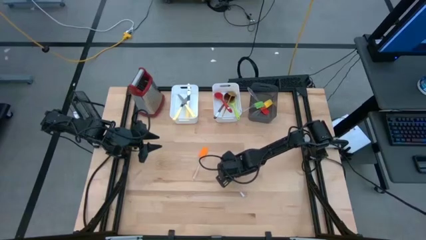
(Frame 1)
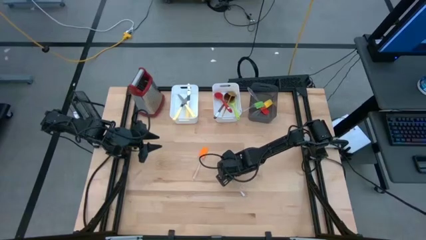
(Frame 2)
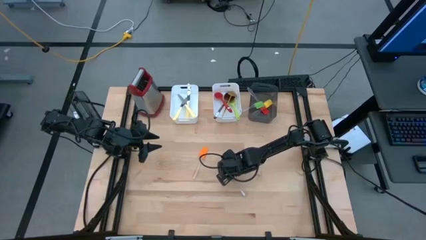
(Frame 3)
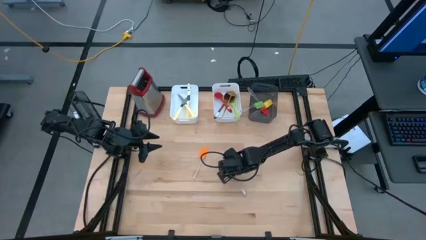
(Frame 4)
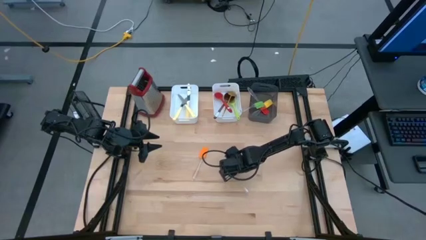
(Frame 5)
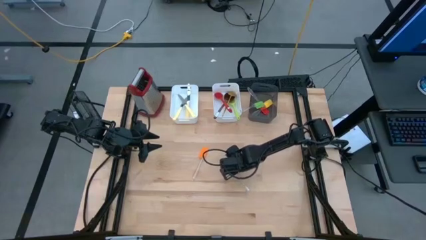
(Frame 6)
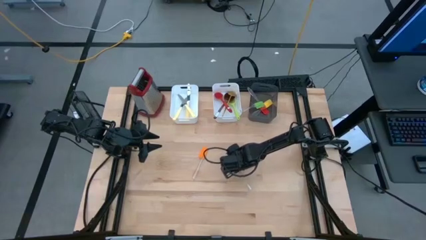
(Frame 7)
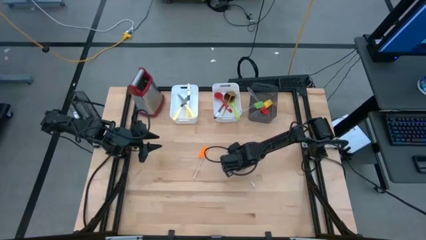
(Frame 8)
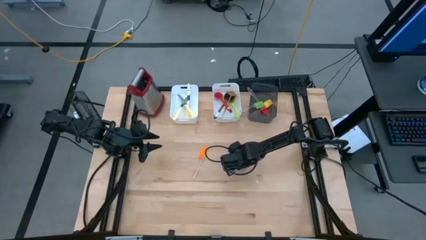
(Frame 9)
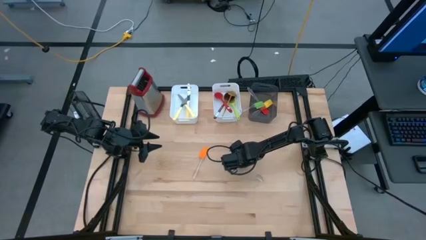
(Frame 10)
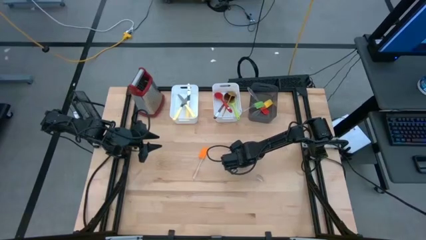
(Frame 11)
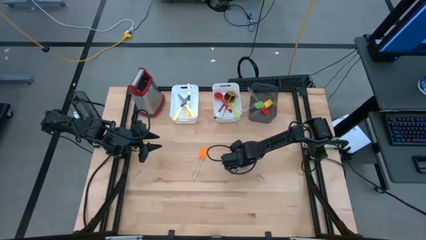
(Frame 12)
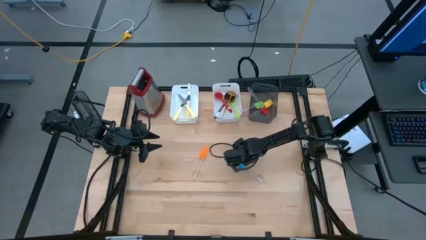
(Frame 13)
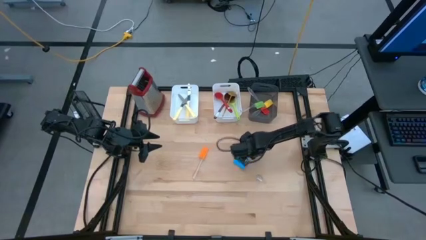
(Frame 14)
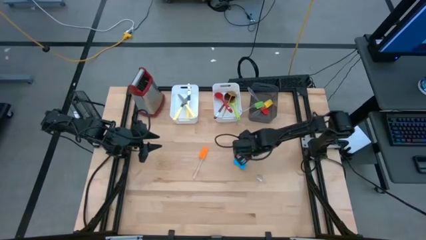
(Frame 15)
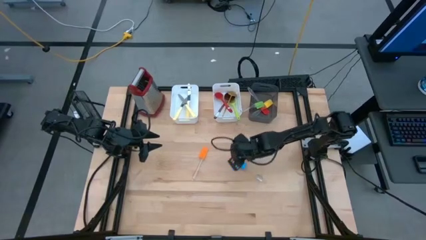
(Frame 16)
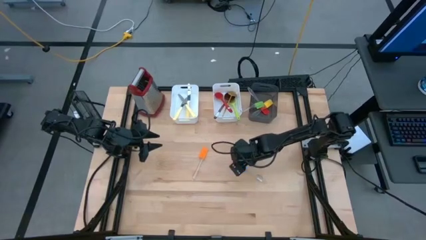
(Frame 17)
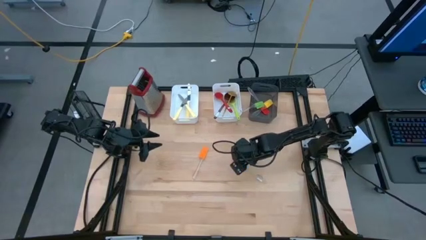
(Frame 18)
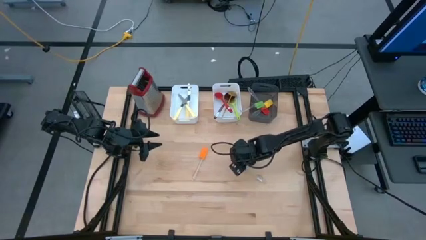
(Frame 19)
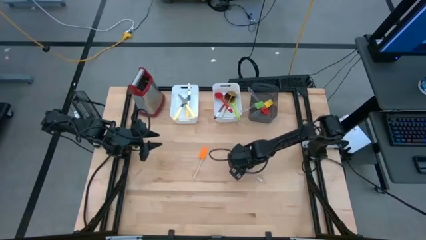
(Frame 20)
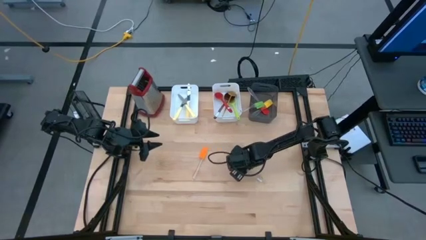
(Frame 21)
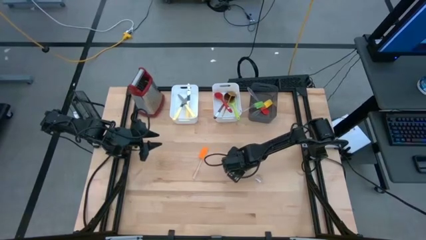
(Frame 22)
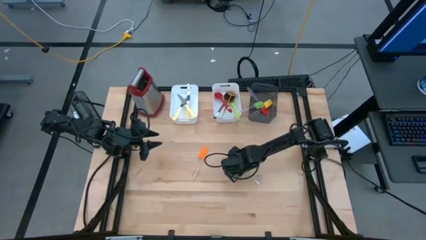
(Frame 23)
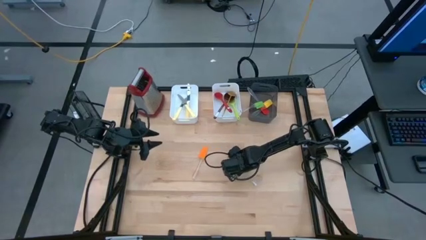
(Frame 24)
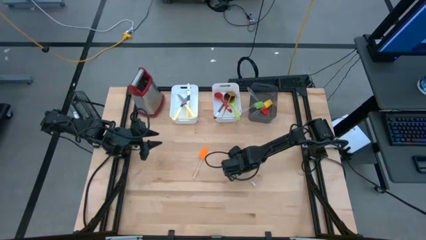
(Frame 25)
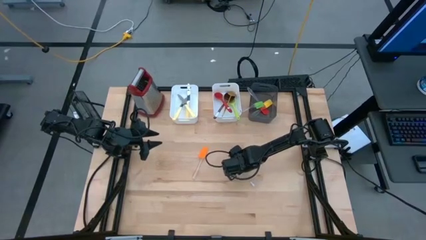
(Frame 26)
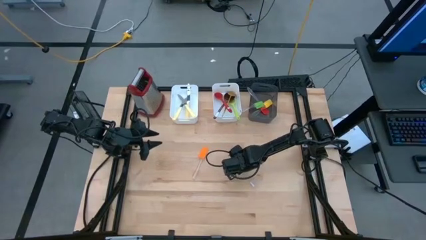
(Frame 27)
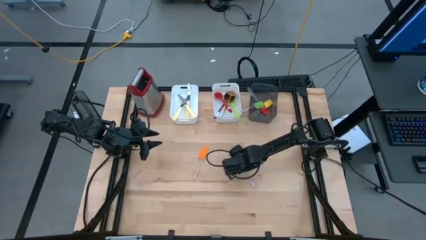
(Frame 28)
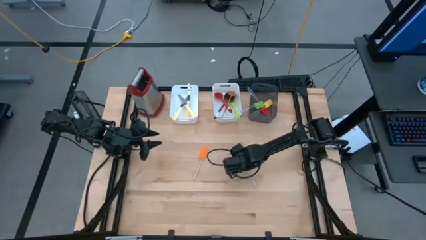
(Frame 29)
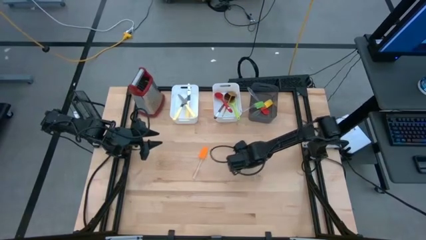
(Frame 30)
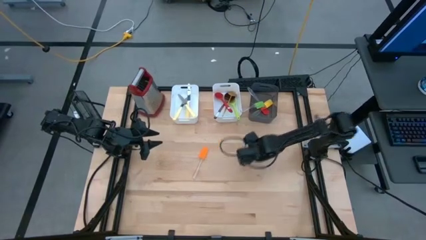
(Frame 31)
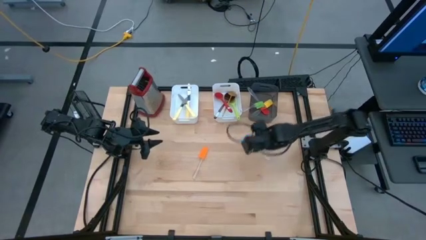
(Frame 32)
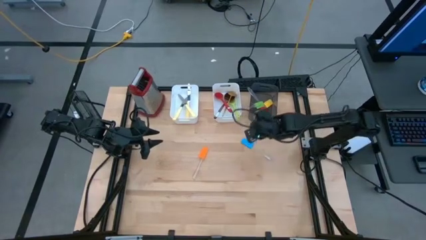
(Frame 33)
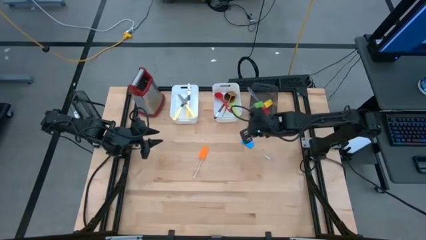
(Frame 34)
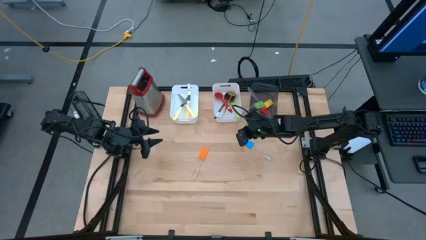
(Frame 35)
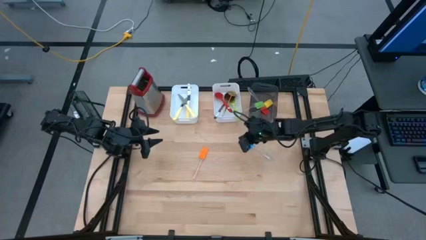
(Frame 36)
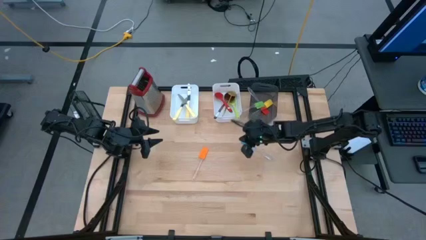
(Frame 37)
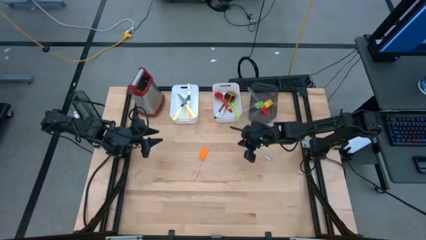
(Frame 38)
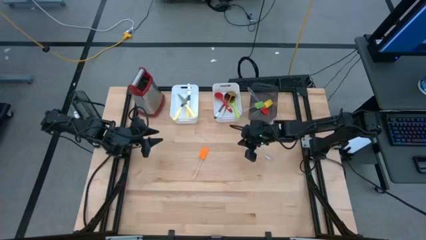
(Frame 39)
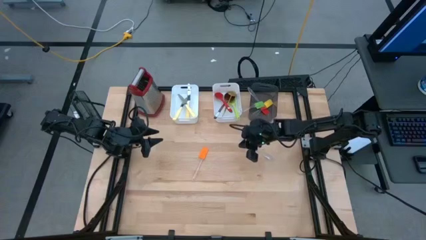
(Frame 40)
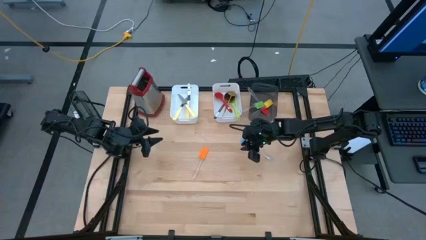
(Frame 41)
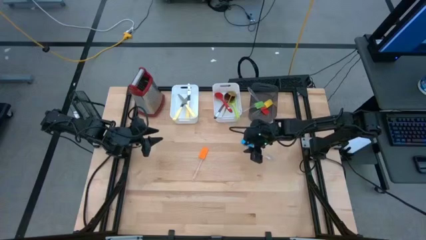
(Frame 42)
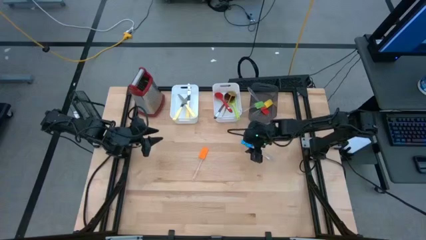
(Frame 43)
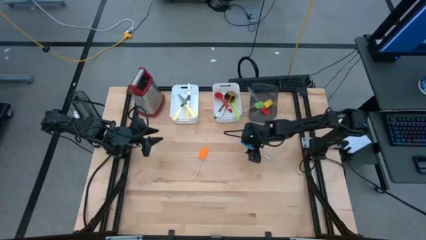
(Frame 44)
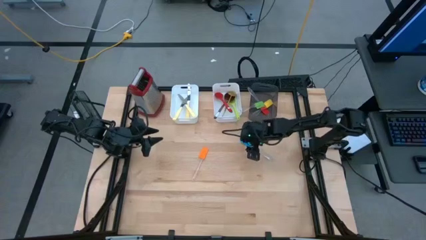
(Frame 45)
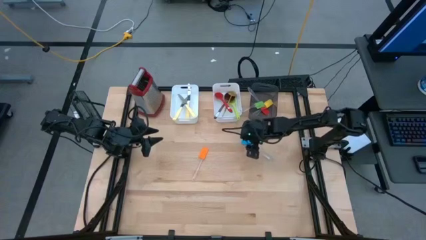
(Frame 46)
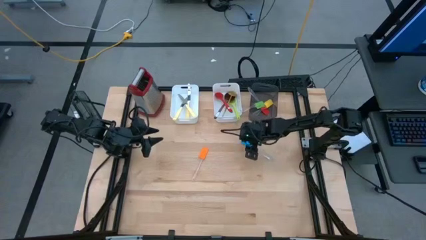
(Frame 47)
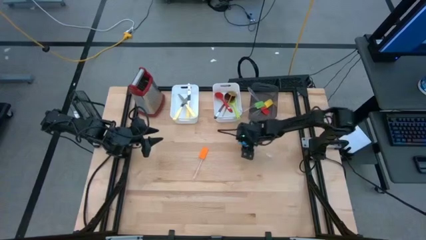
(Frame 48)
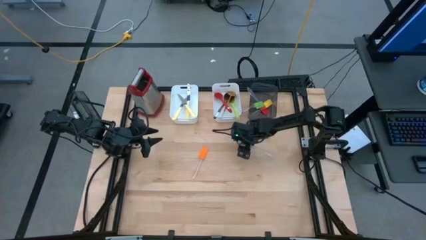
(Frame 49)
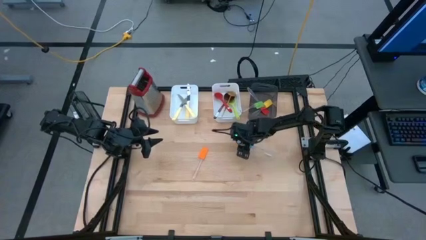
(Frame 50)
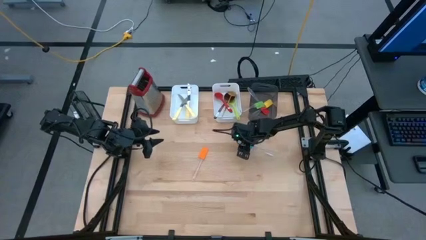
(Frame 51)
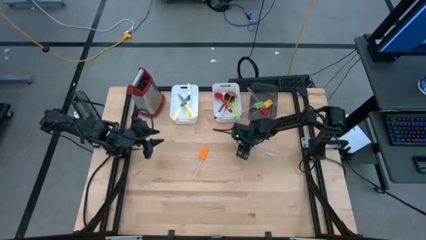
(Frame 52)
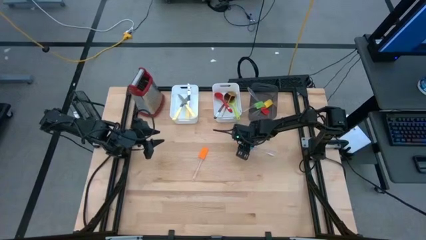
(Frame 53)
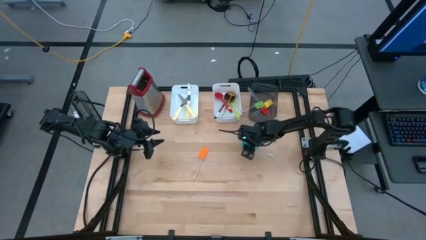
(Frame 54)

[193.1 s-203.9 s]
Task: Pick & Place Kitchen Items
Put the blue spatula into the black bin

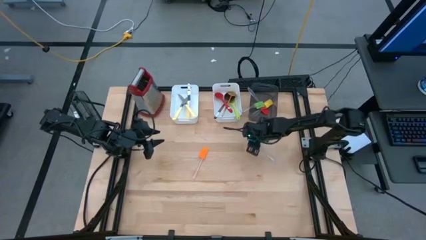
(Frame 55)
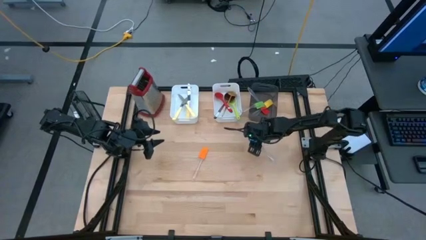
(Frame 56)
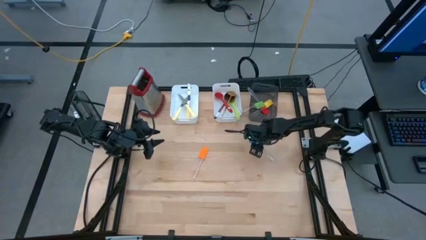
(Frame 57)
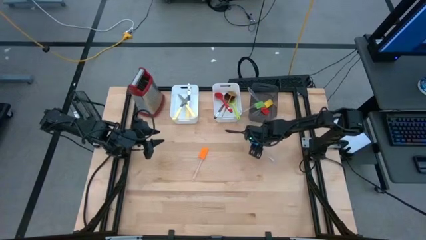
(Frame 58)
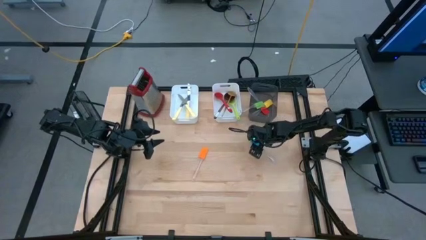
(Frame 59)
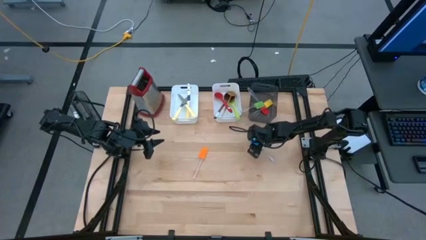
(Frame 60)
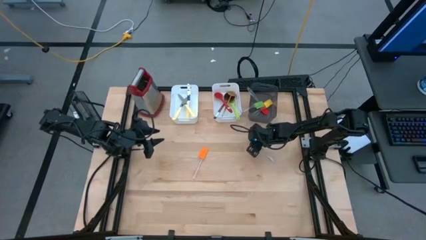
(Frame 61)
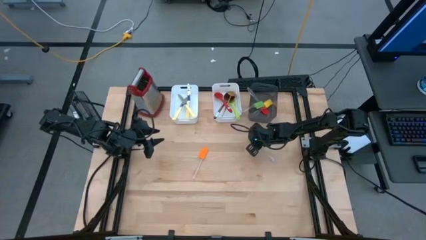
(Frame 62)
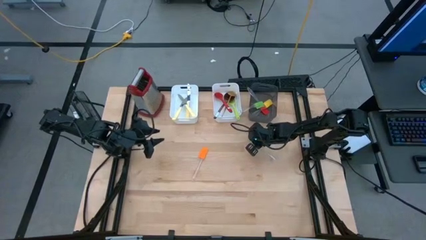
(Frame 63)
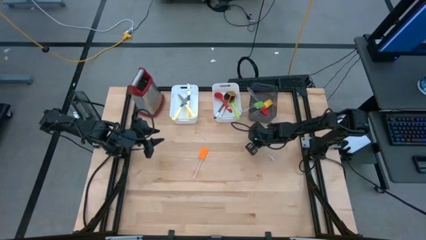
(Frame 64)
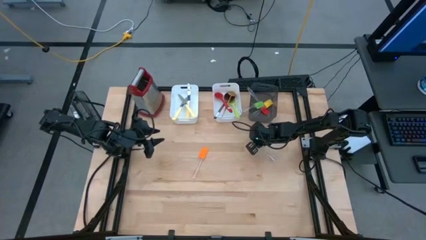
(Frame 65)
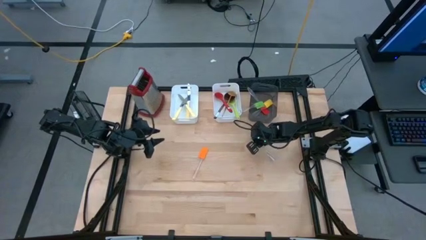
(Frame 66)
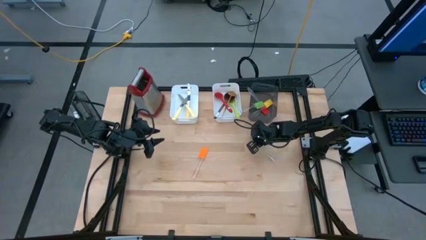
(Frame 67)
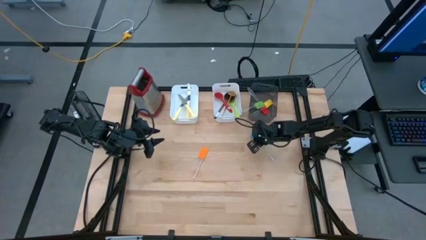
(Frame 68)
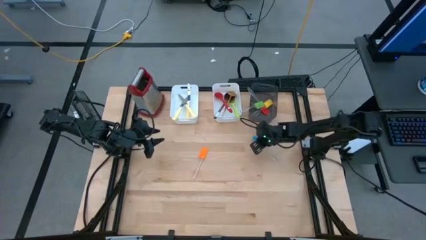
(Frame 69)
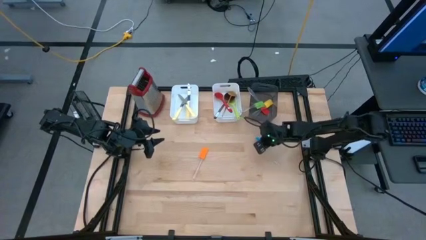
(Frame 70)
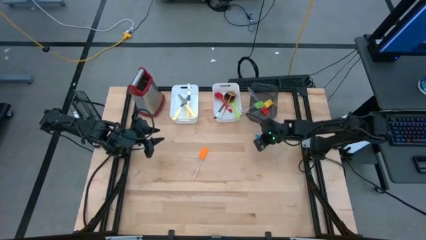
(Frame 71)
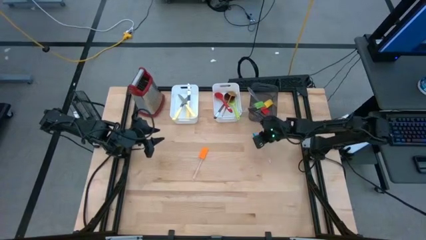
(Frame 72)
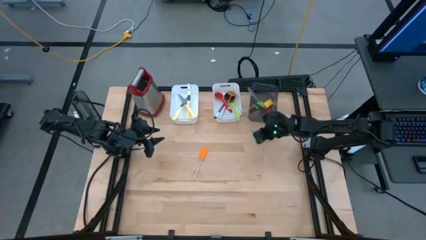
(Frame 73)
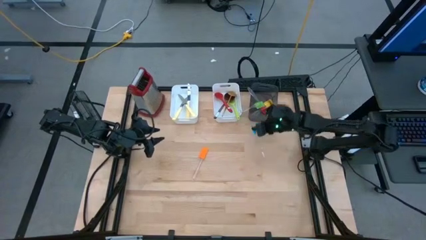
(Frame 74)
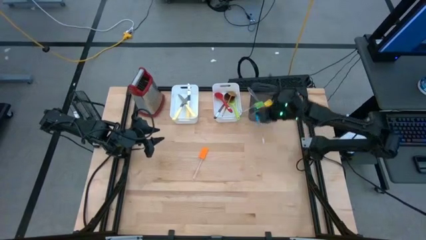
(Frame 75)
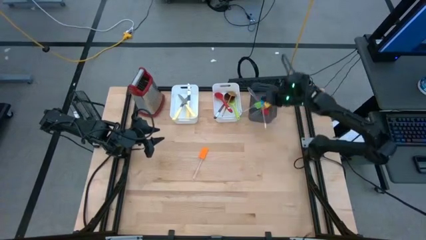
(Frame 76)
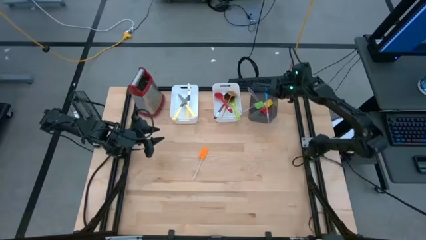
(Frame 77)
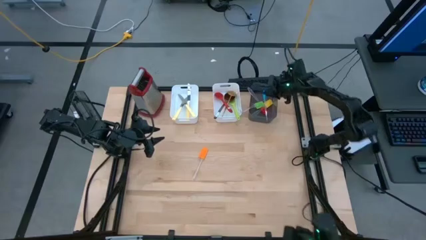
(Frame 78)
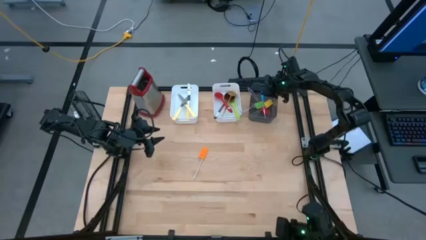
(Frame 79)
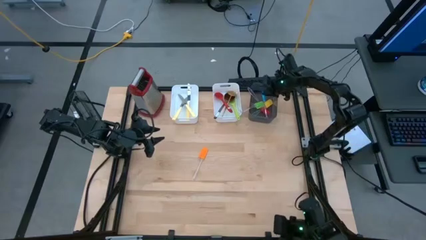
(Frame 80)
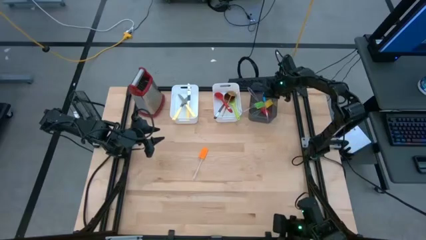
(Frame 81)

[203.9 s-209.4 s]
Put the blue spatula into the black bin
